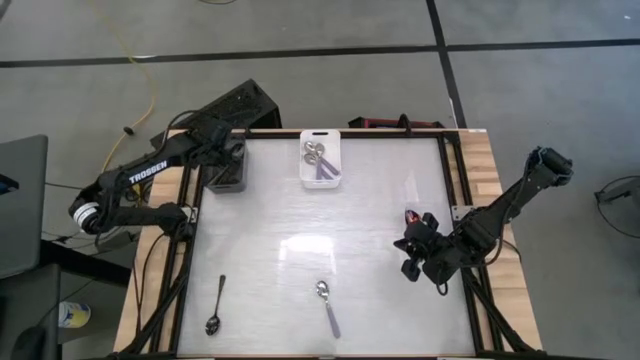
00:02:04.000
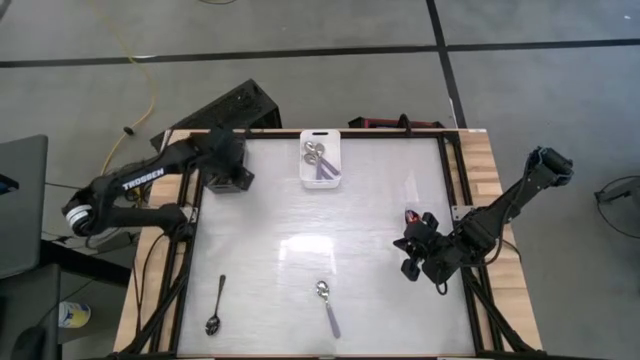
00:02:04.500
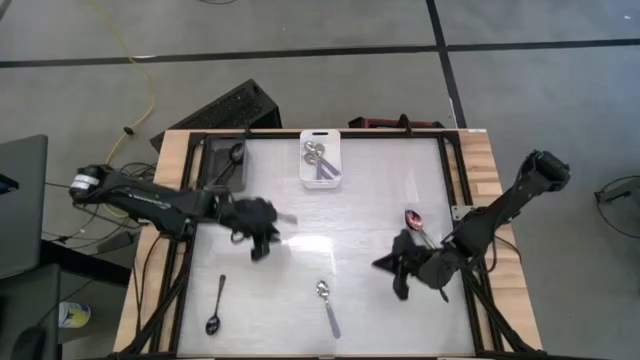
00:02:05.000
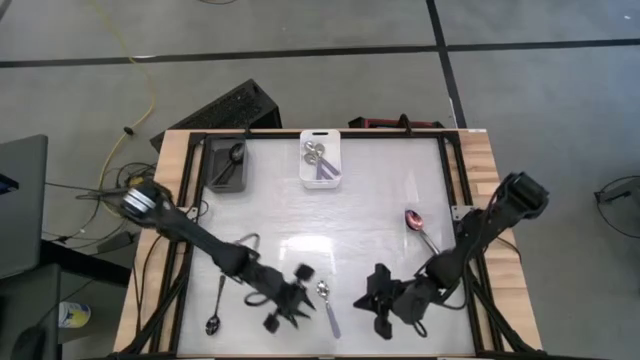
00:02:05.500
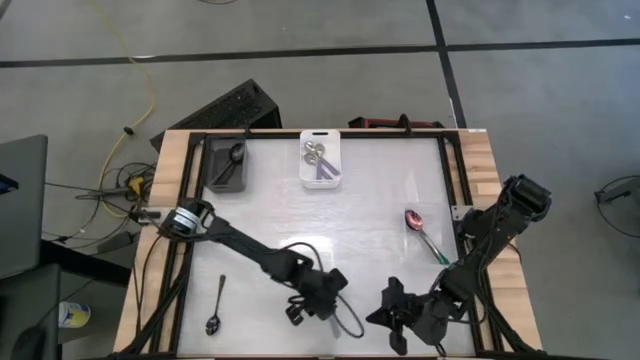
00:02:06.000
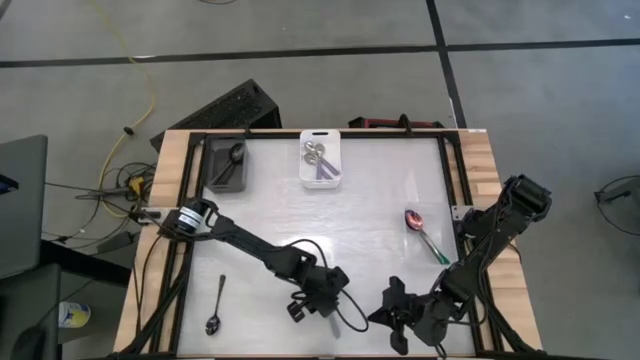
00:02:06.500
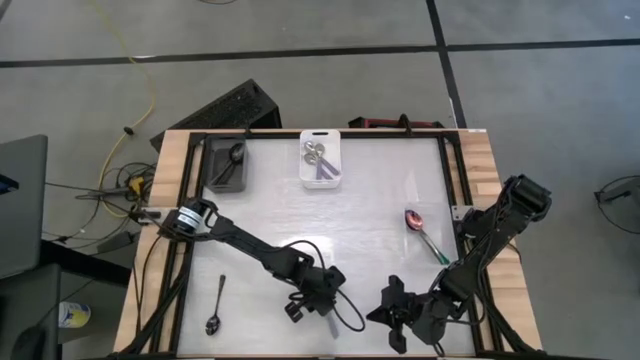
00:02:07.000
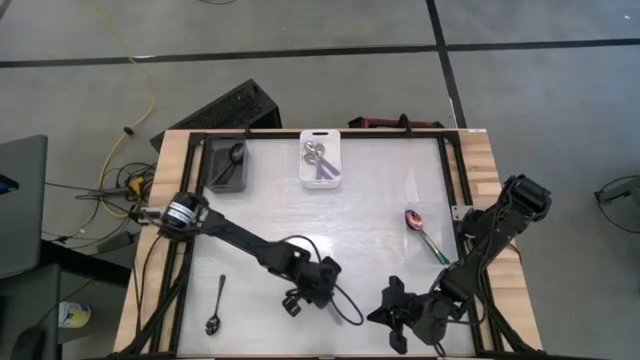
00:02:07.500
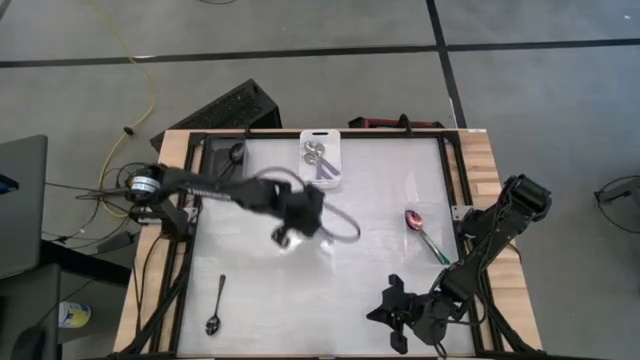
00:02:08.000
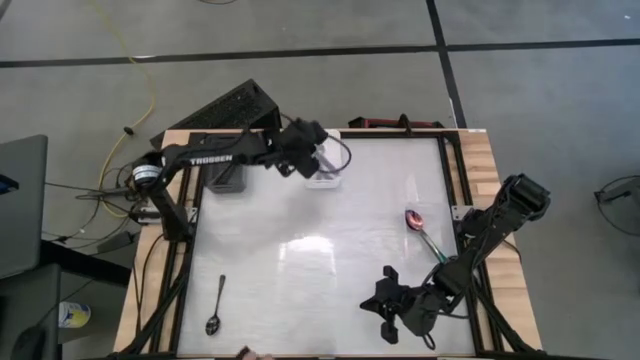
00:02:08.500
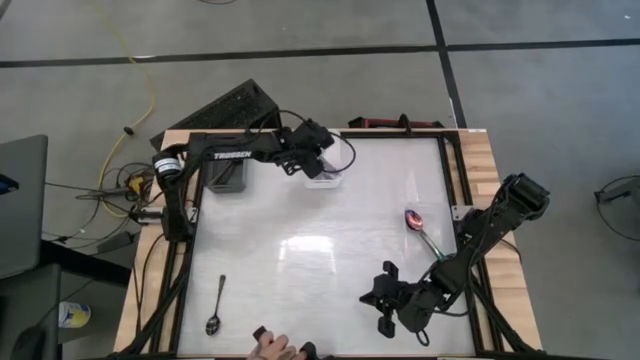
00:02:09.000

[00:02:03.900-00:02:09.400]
Task: Sort silverware by color (type)
Put the purple spoon into the white bin

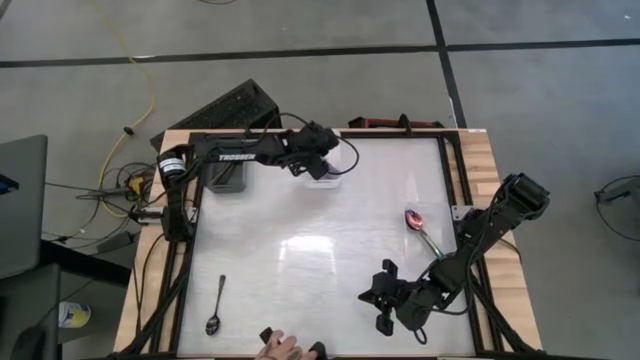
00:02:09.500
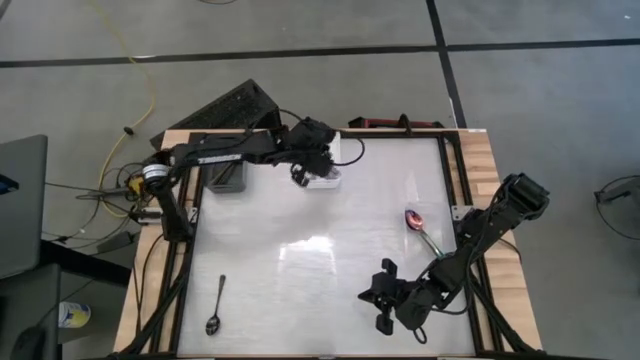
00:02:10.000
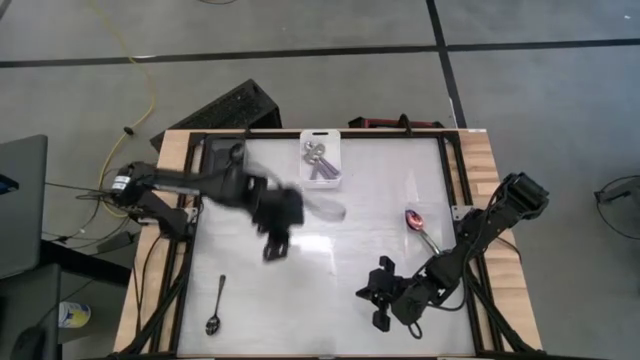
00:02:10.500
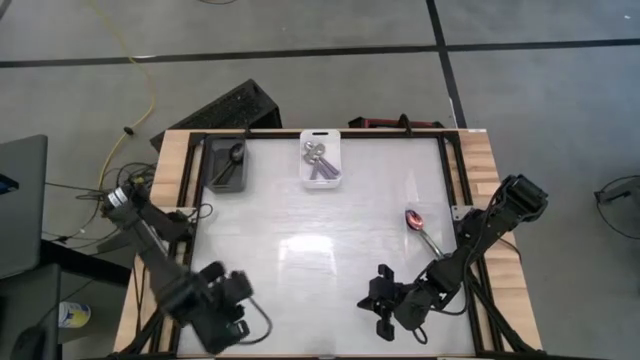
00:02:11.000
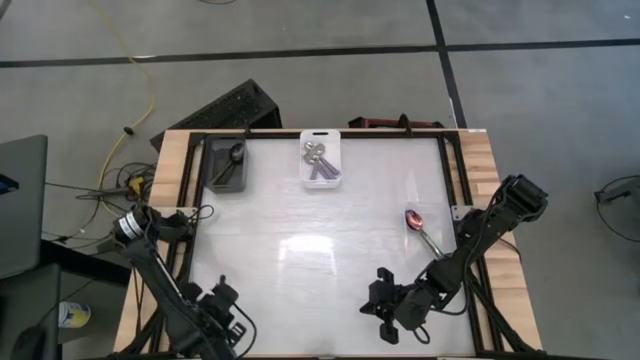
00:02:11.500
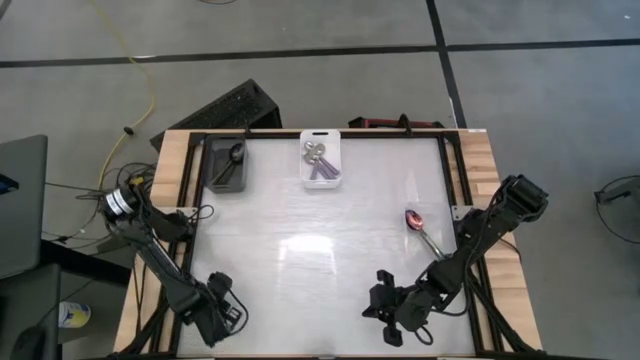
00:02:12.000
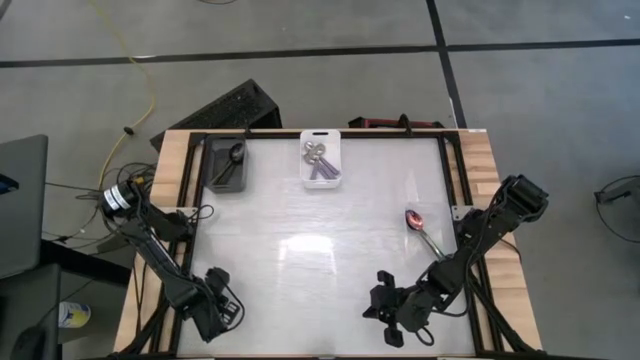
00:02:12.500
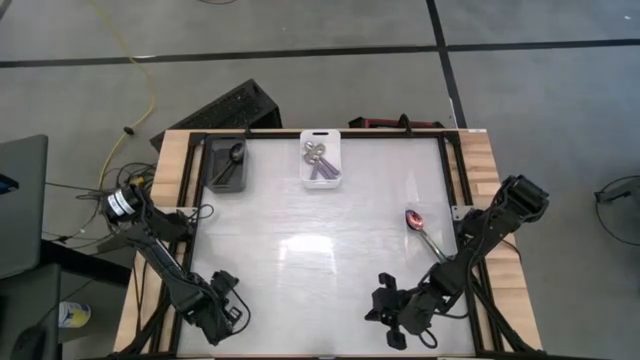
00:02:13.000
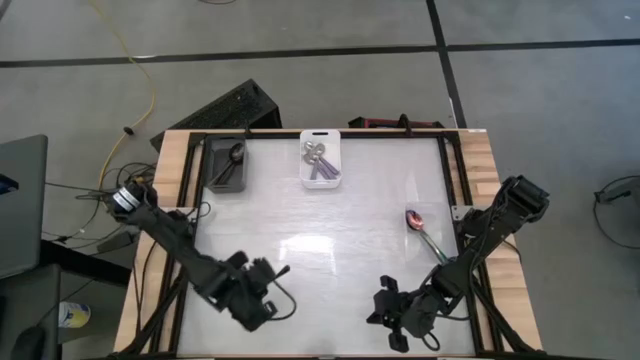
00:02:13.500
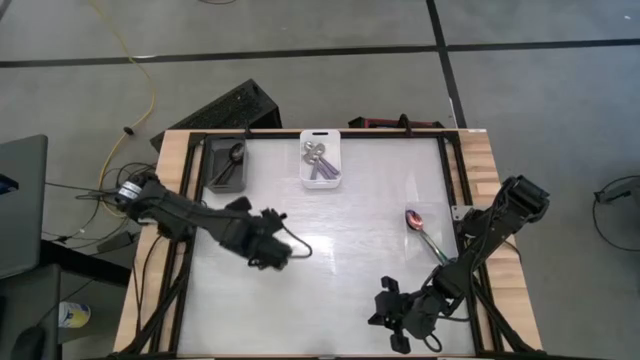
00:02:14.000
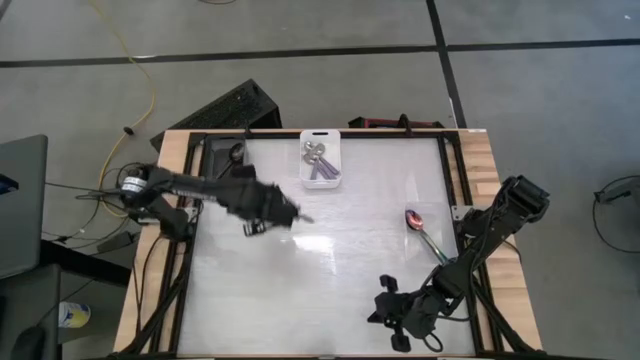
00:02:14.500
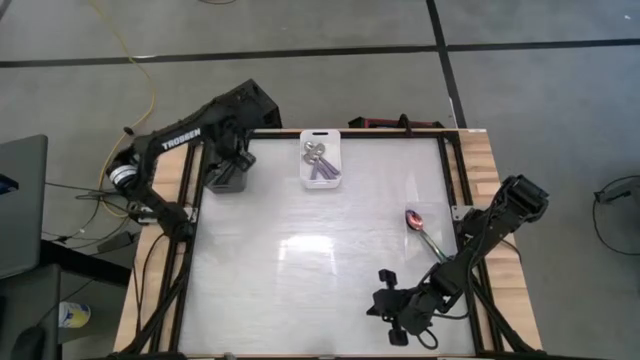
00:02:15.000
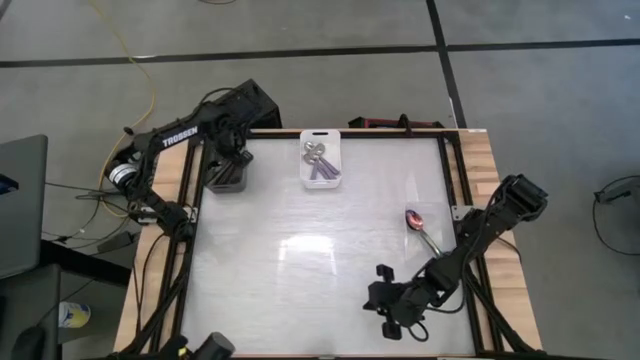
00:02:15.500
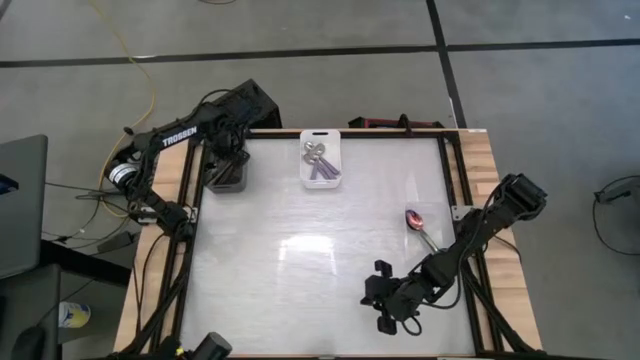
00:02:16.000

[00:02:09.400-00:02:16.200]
Put the black spoon into the black bin

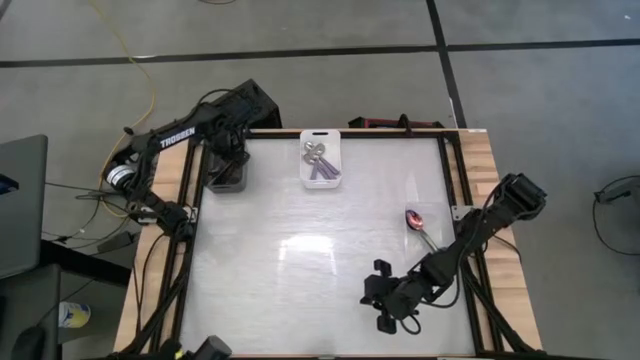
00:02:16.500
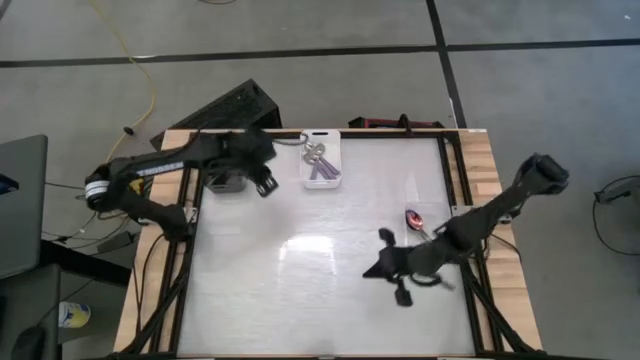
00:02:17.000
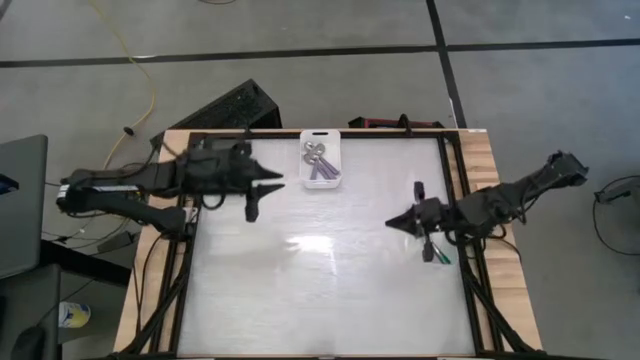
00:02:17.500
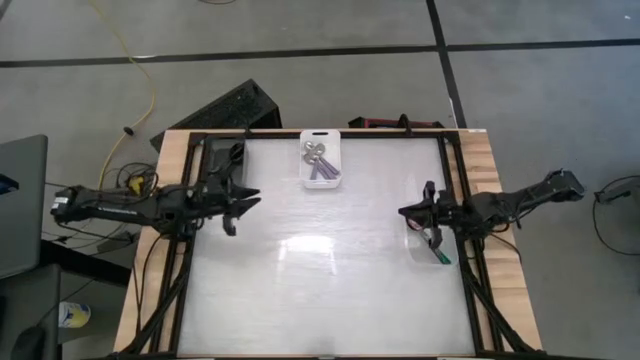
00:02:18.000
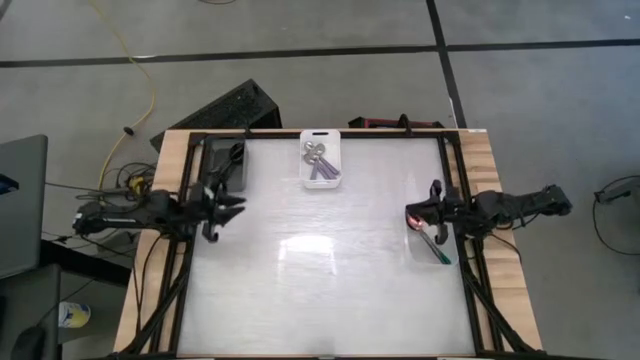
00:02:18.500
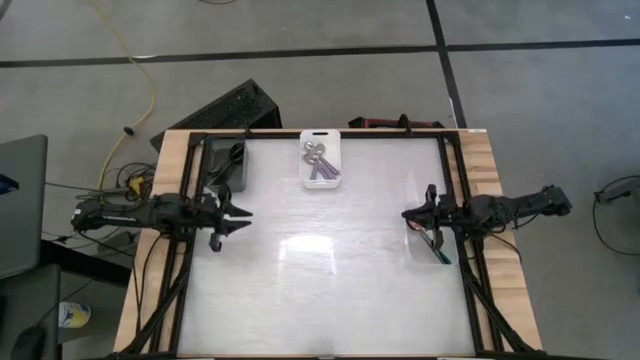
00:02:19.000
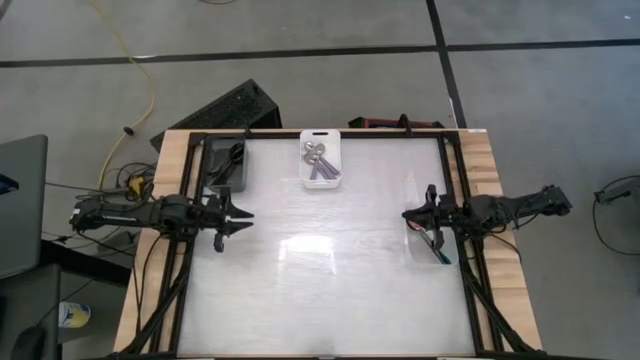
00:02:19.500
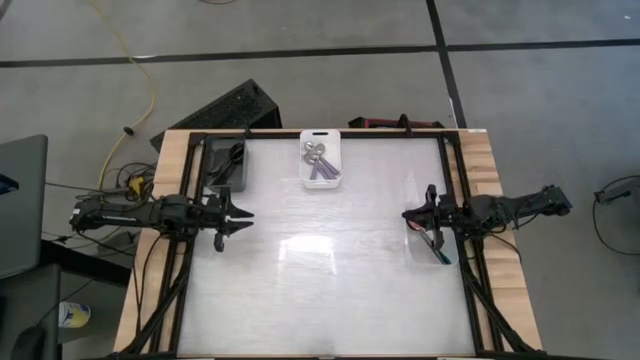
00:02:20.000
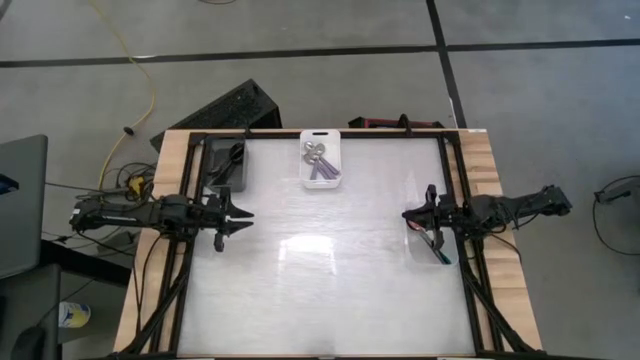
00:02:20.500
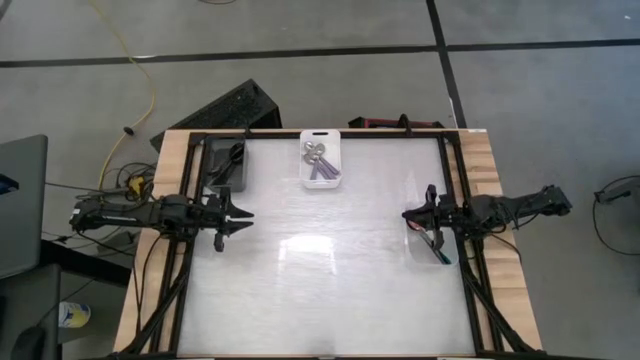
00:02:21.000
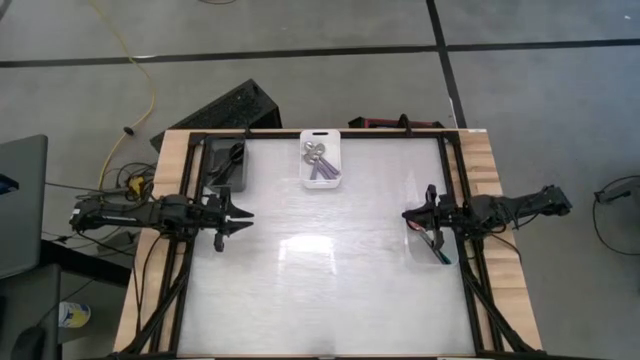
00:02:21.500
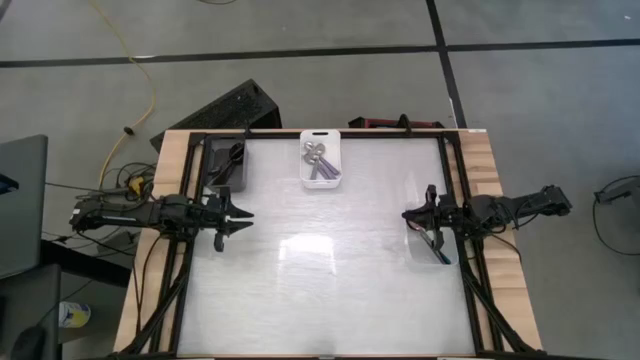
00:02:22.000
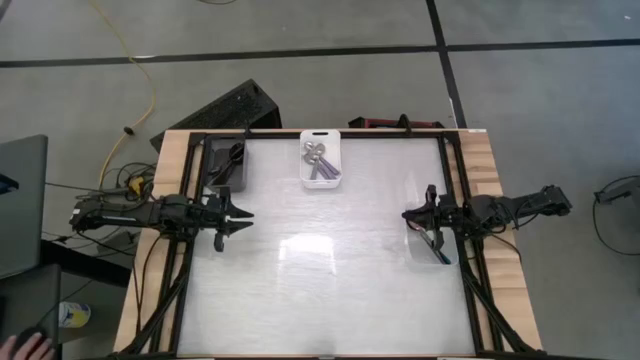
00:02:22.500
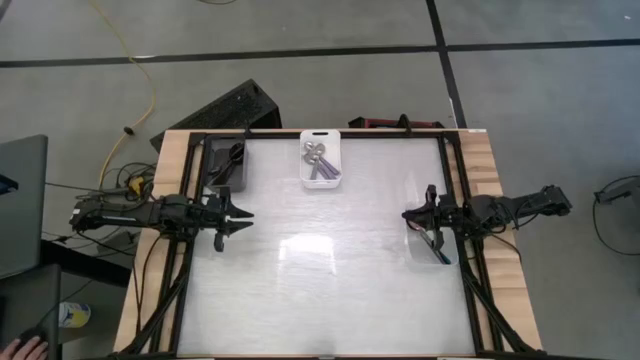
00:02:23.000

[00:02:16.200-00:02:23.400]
Return to Home Position

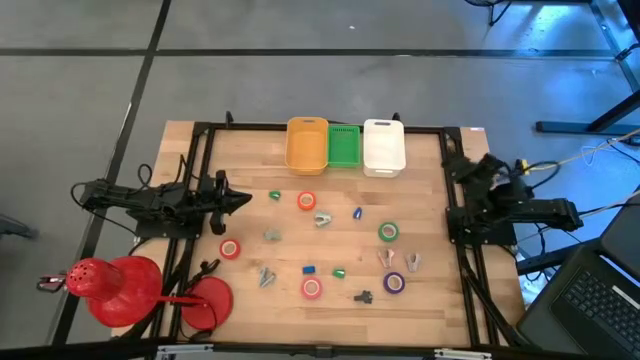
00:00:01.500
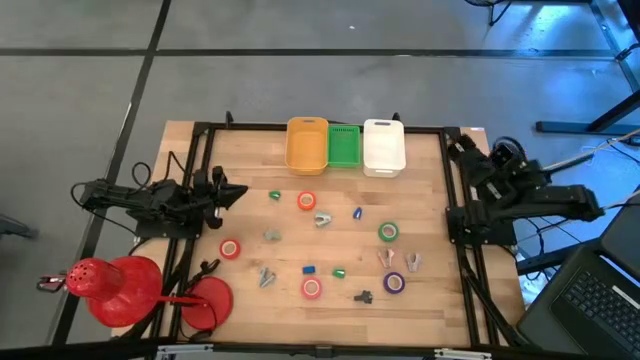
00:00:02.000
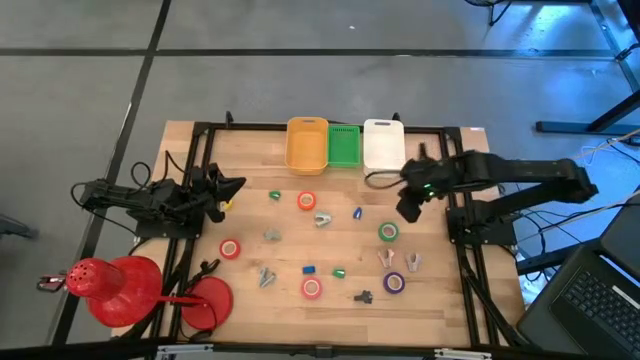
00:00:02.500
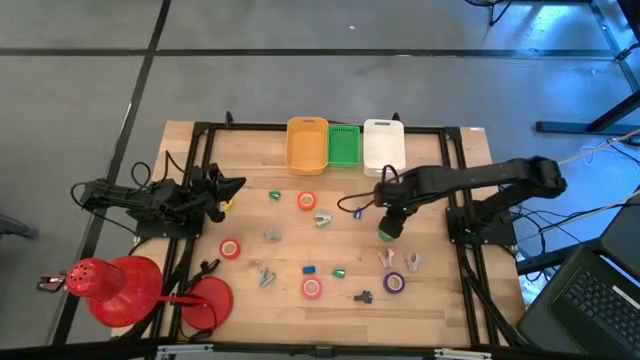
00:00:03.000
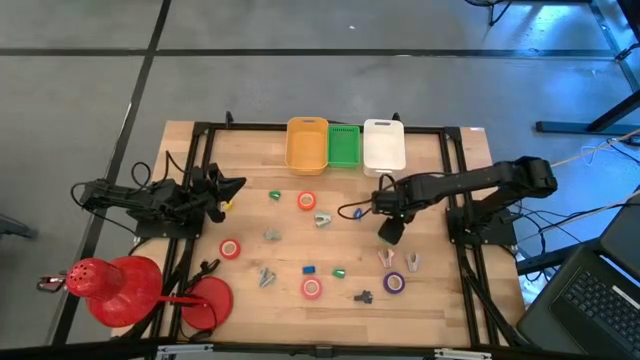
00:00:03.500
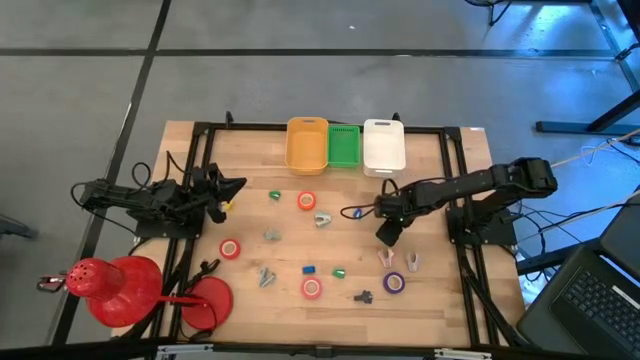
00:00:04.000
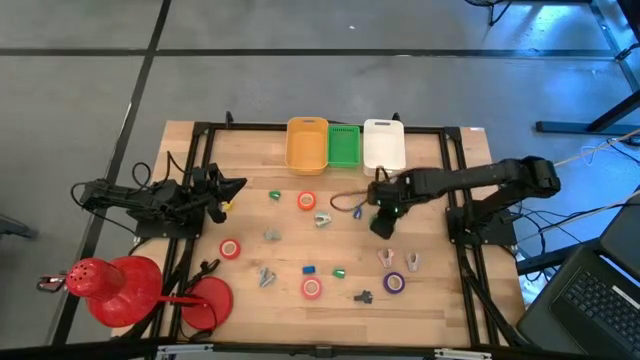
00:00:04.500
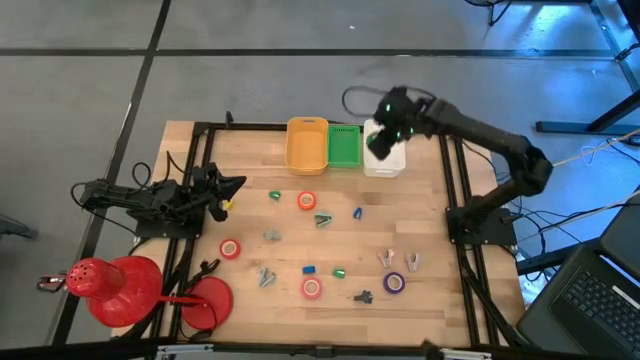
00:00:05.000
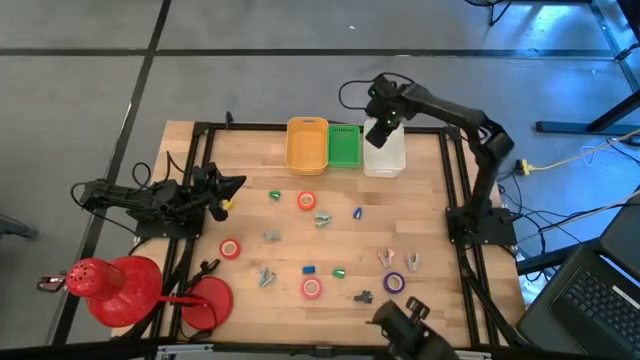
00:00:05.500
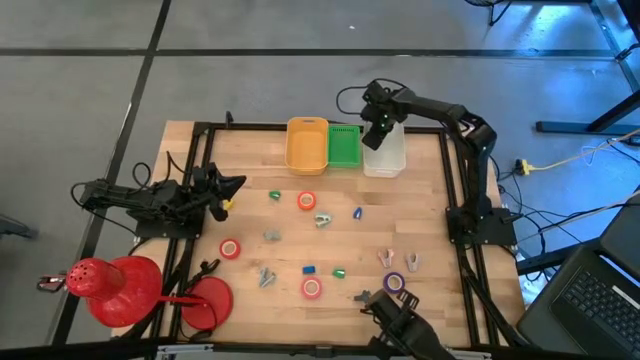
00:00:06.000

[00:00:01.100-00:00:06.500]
Task: Pick and place Stapler, Stapler remover, tape
Put the green tape into the white bin
